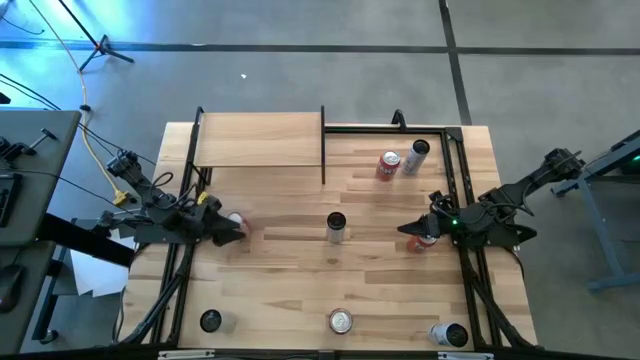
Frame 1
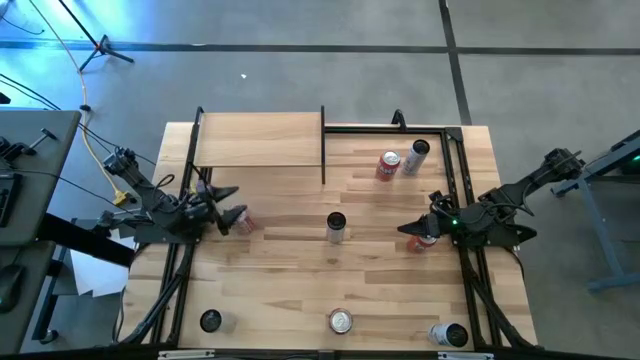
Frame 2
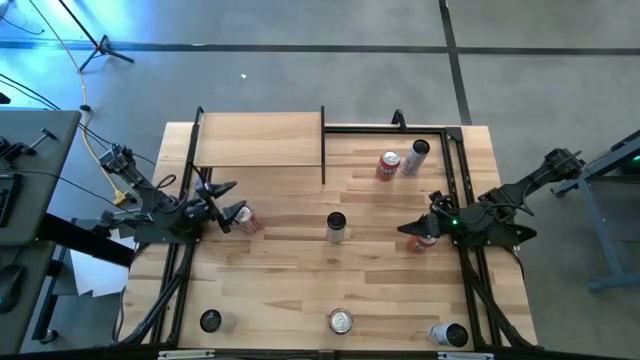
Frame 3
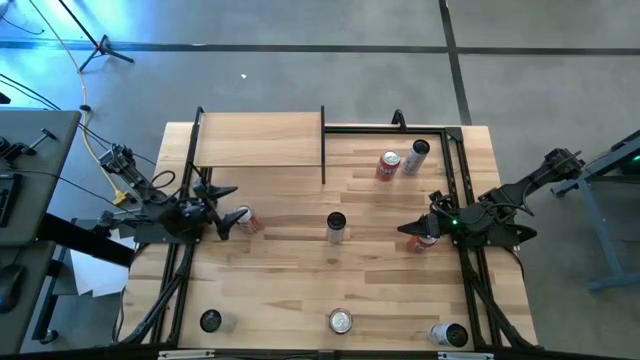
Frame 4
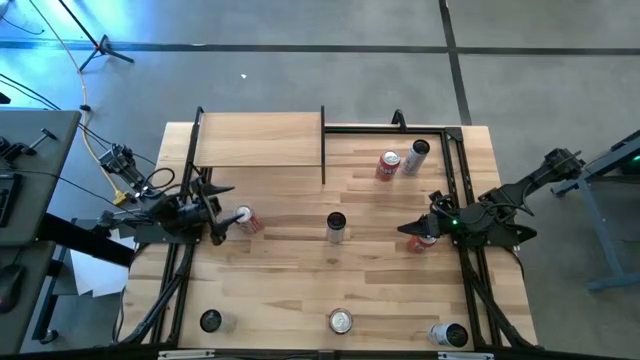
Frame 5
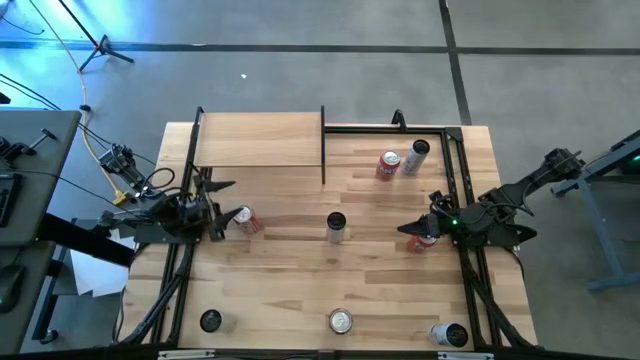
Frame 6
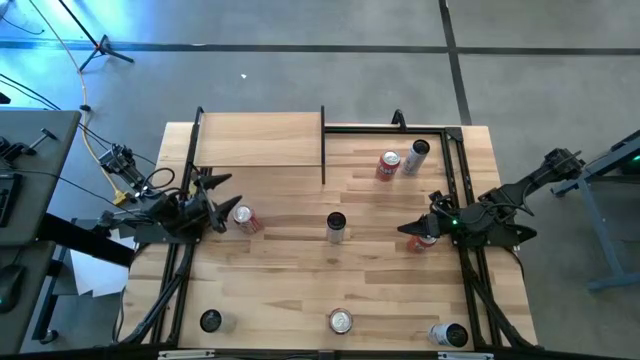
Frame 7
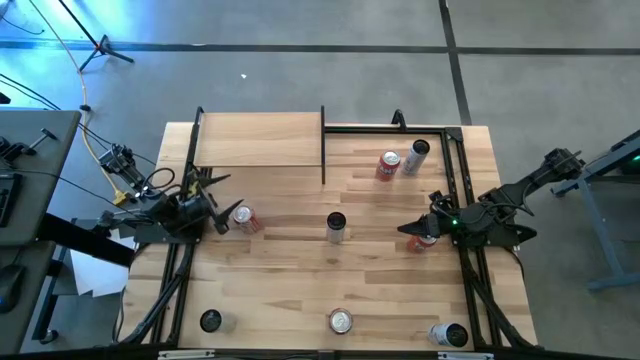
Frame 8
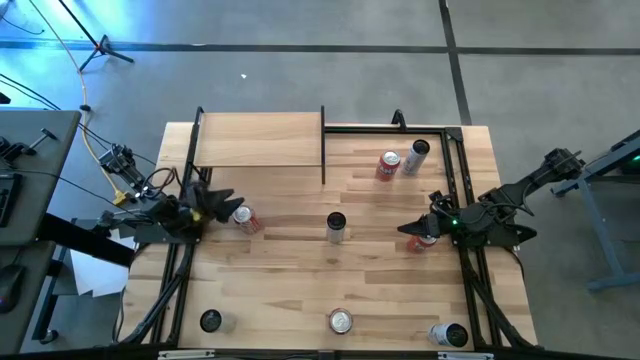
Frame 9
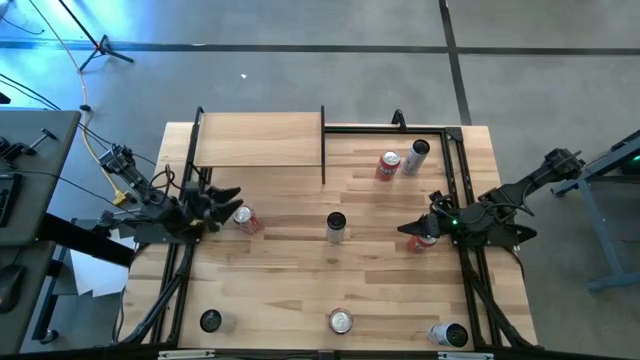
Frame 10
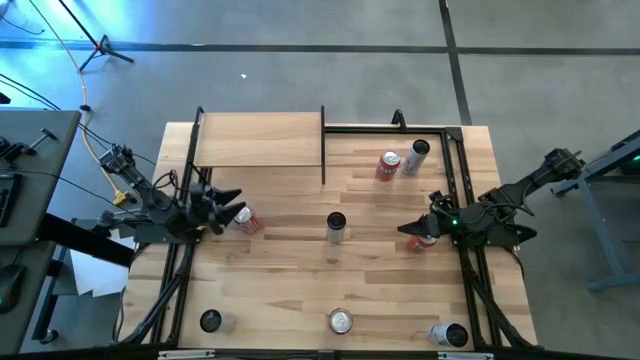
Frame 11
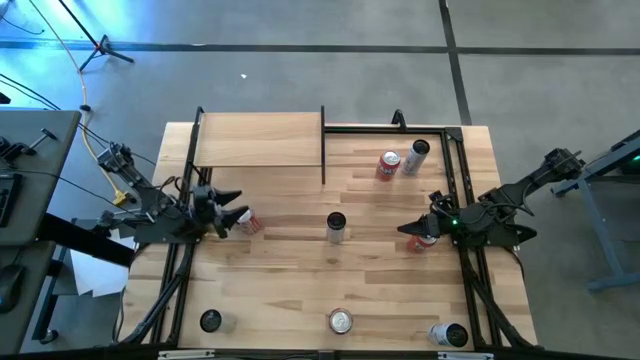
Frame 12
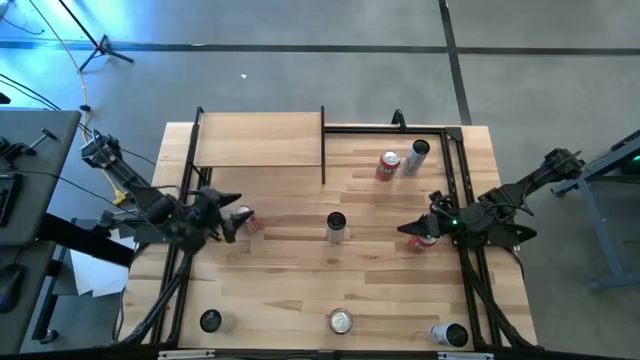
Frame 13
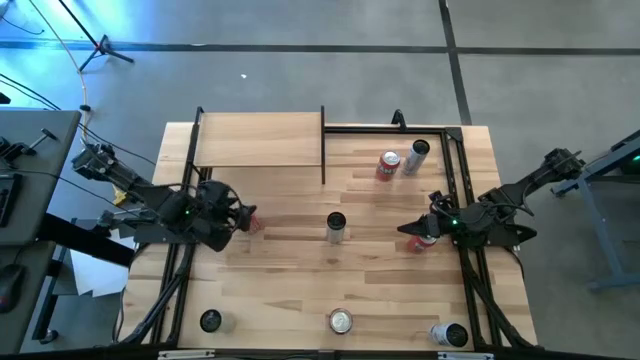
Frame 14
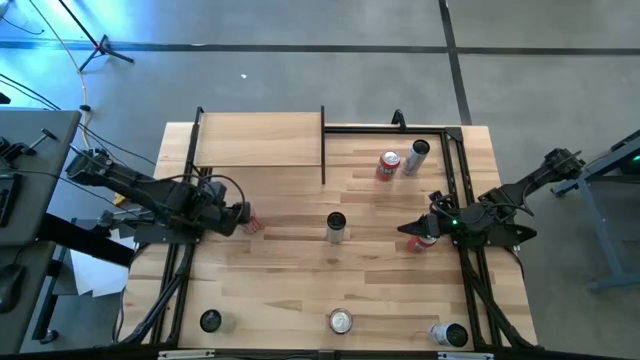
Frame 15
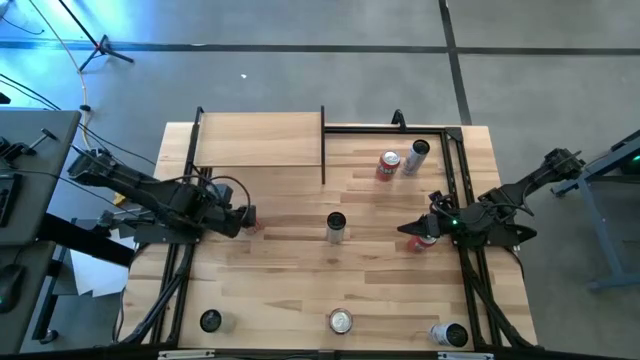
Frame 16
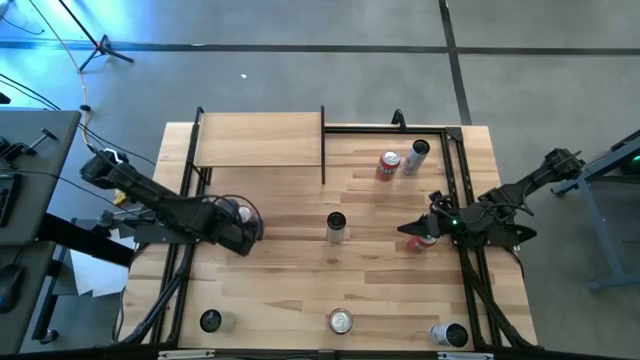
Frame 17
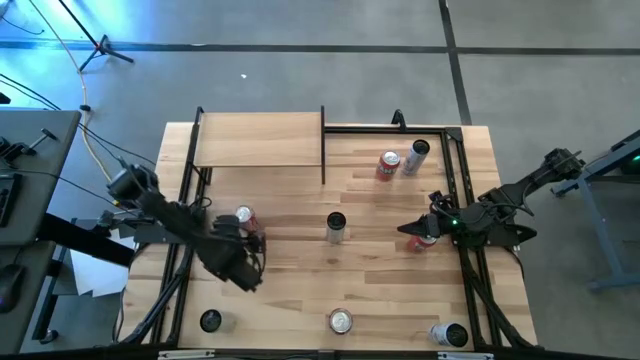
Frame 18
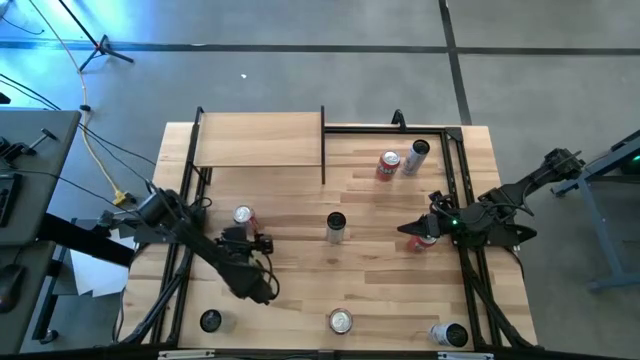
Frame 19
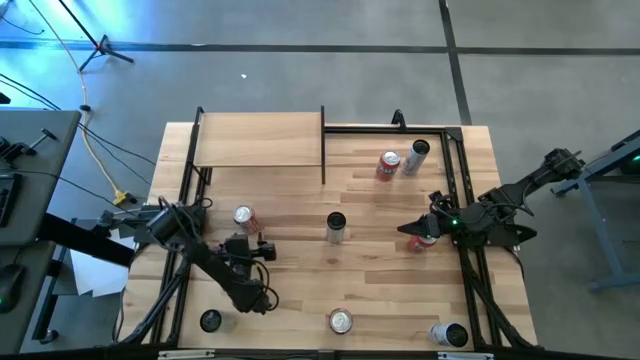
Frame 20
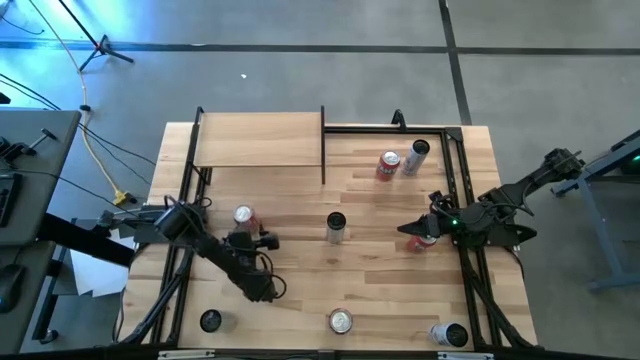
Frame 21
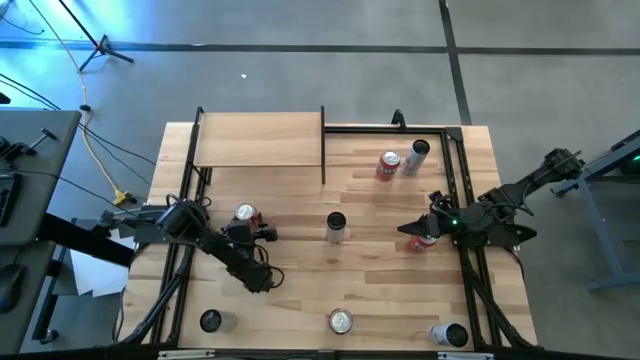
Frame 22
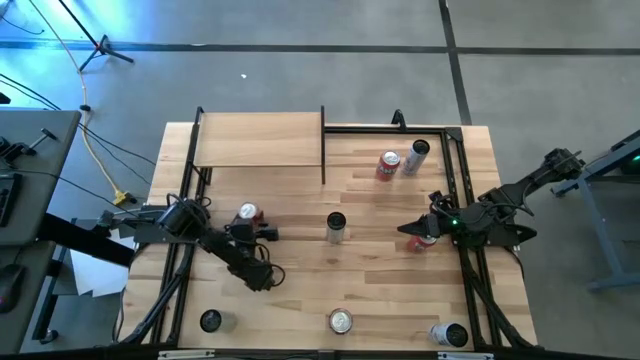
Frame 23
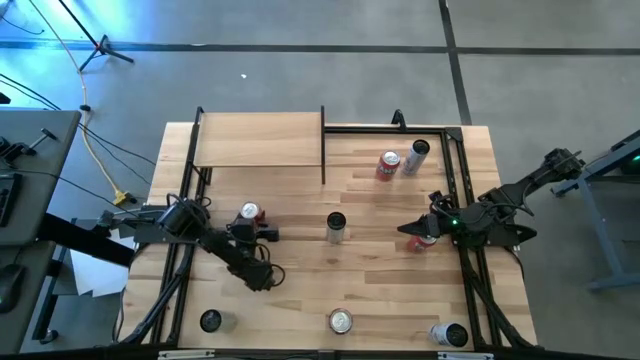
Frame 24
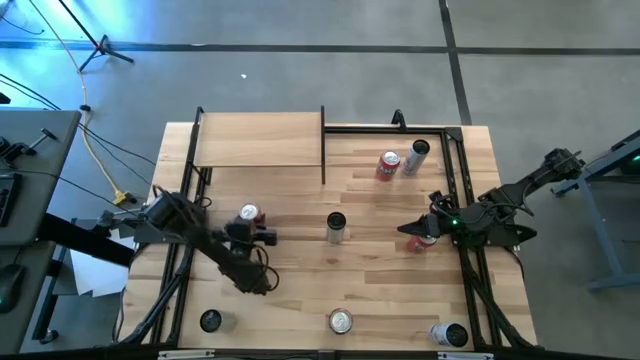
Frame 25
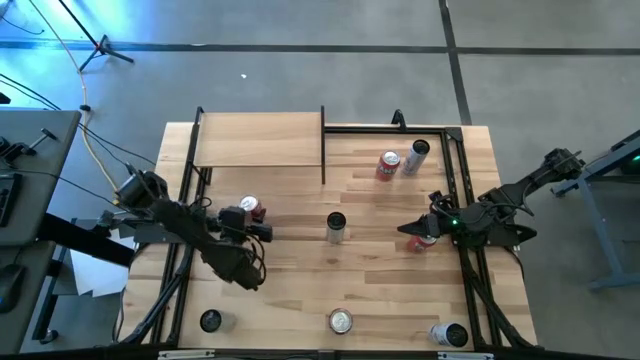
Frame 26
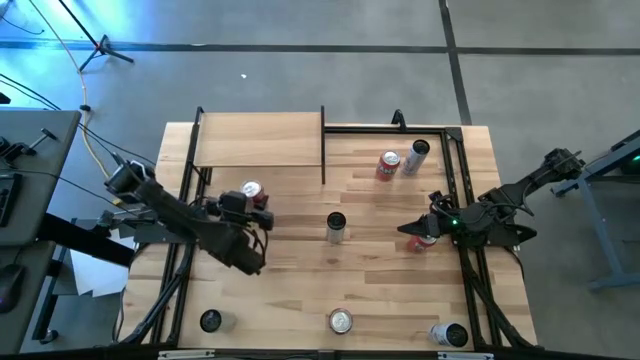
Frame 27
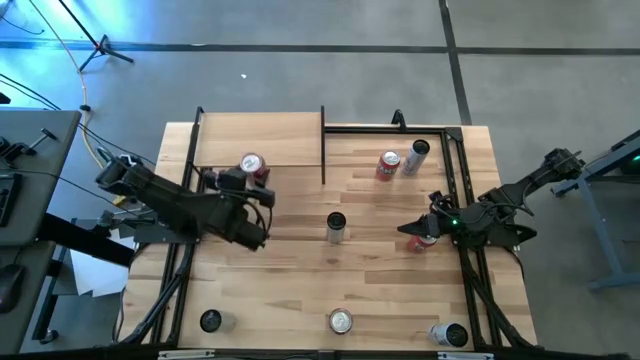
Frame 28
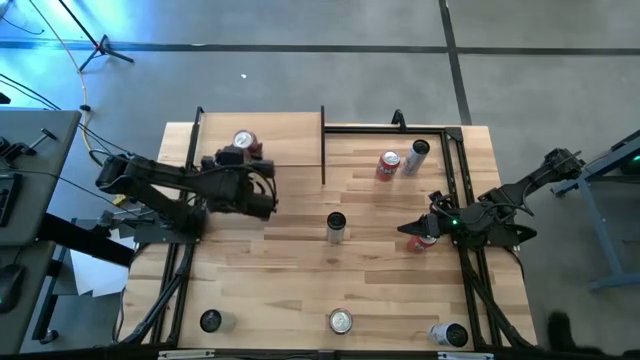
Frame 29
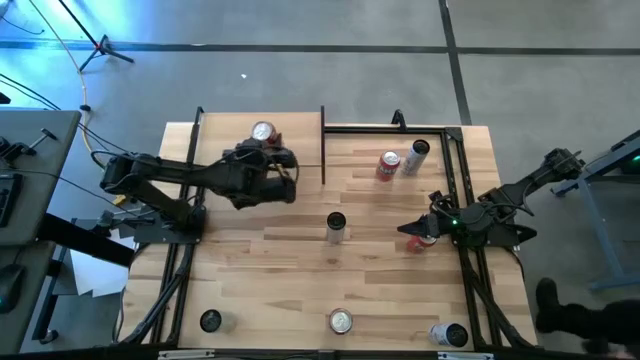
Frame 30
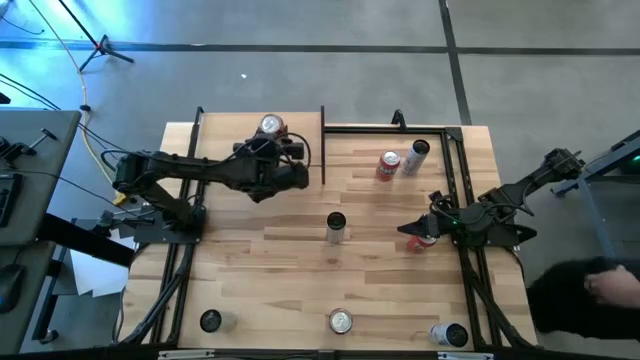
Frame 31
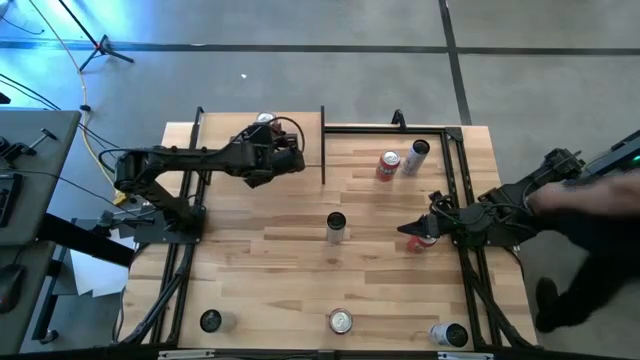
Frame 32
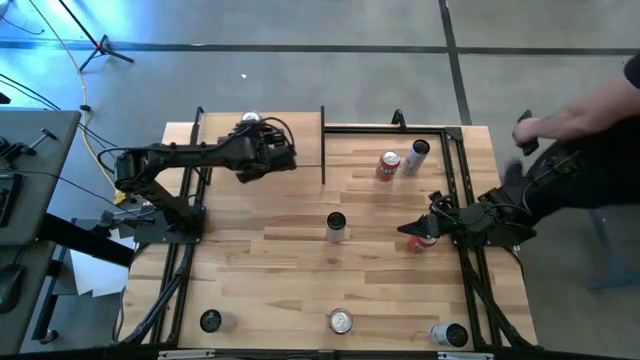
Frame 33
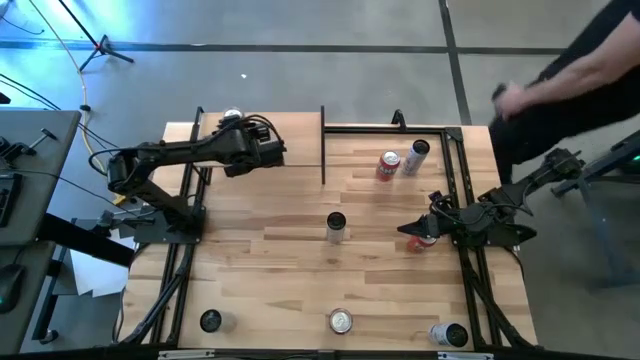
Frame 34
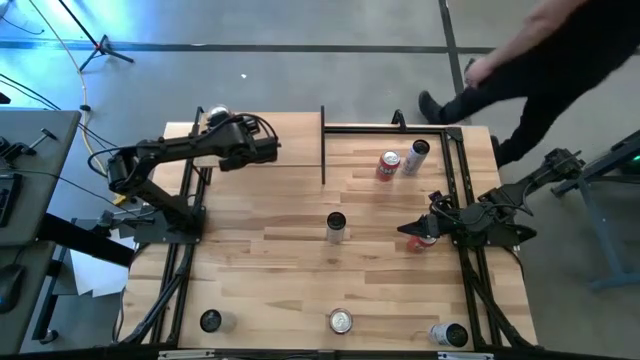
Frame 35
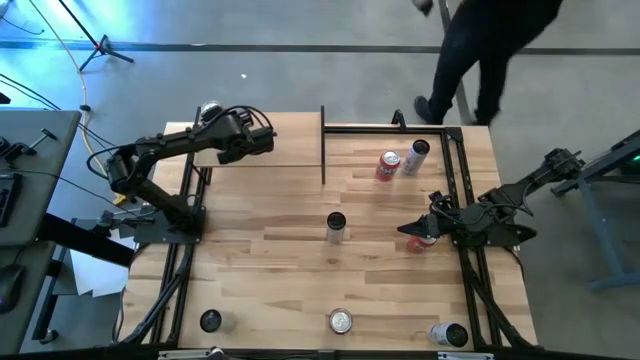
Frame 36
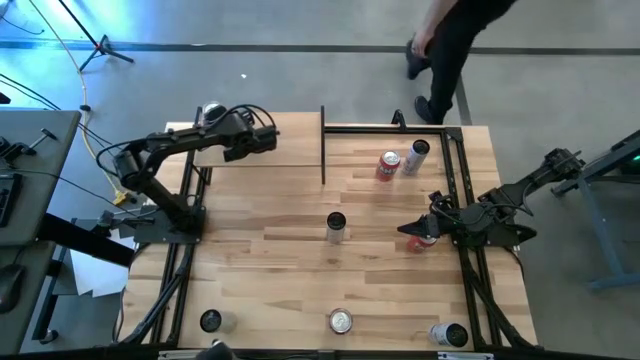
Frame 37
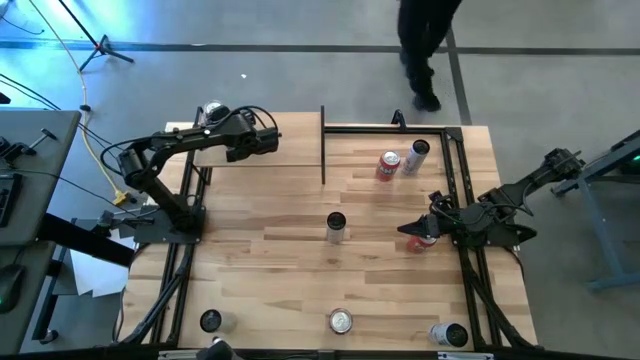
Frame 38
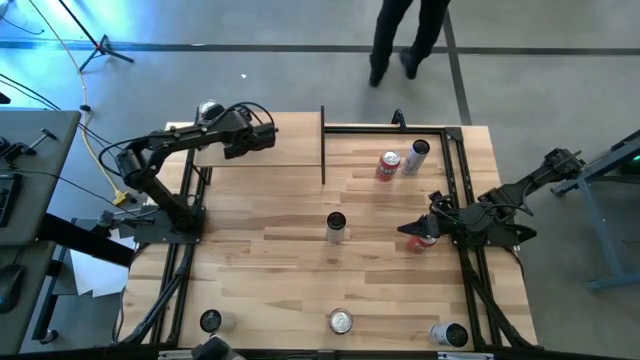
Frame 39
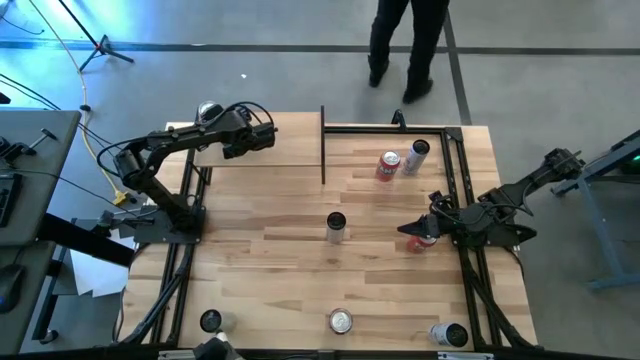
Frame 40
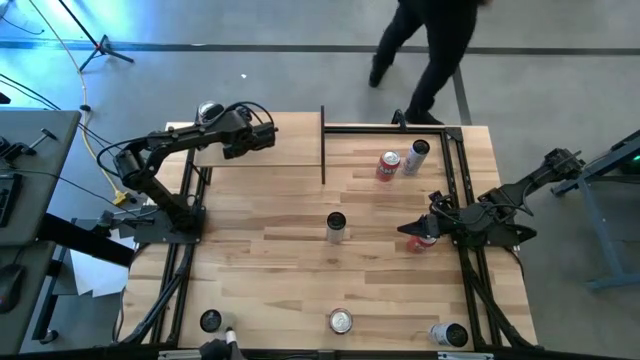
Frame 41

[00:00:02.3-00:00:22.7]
Task: Place canned beverage on shelf
Put the top red soda can on the shelf
